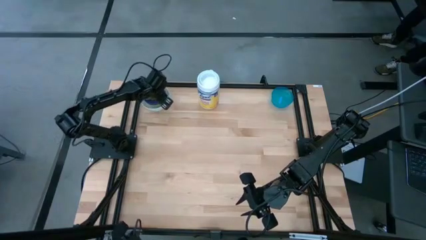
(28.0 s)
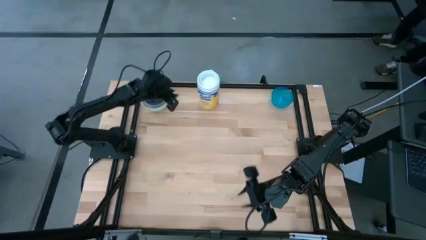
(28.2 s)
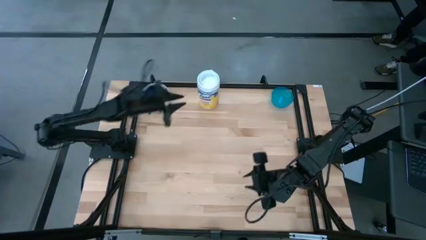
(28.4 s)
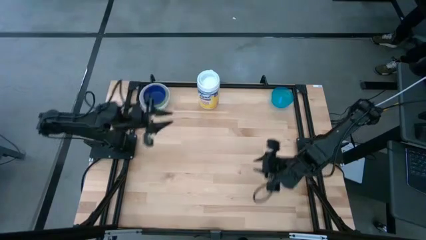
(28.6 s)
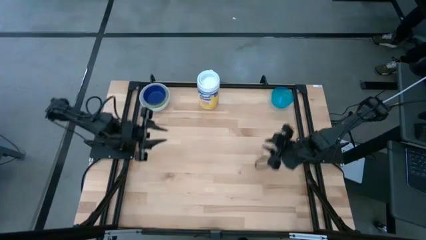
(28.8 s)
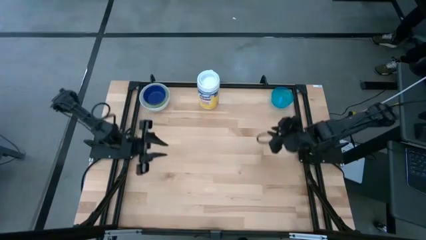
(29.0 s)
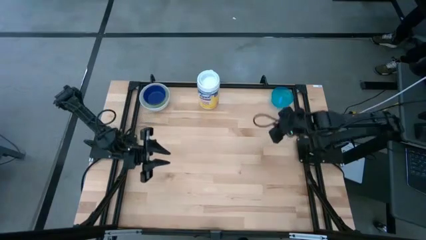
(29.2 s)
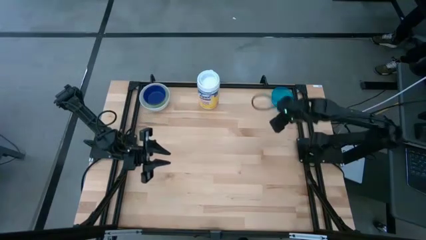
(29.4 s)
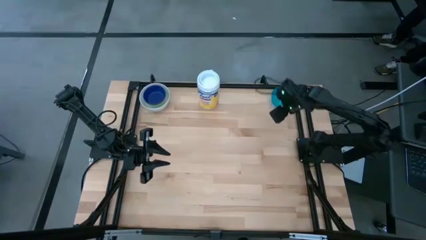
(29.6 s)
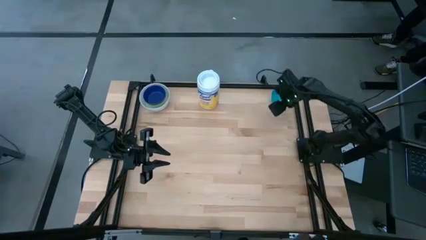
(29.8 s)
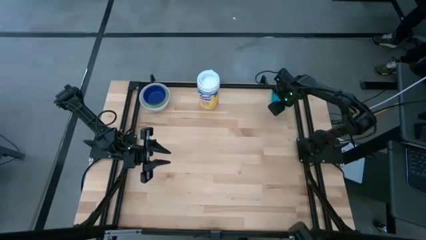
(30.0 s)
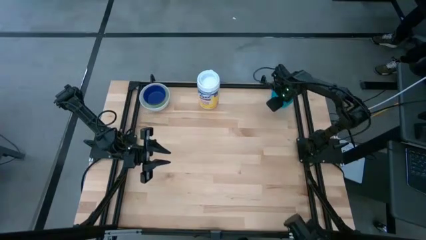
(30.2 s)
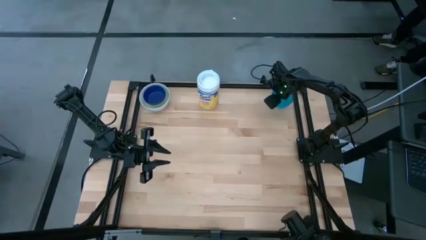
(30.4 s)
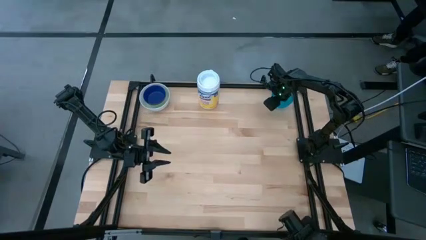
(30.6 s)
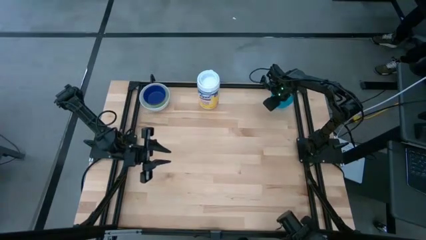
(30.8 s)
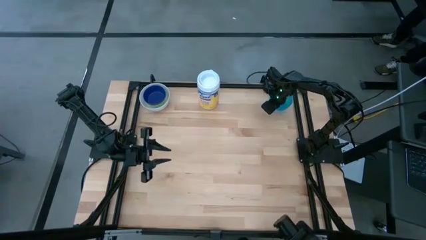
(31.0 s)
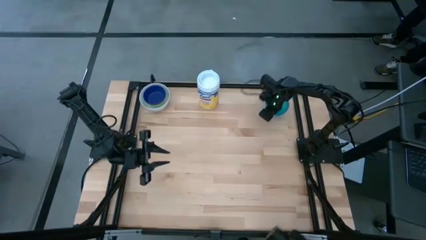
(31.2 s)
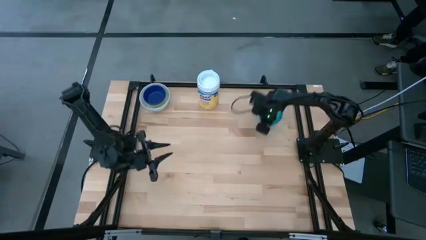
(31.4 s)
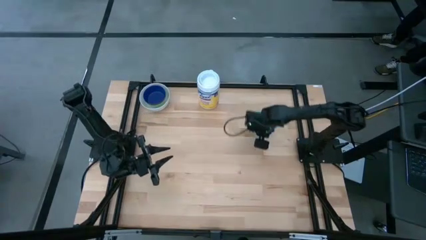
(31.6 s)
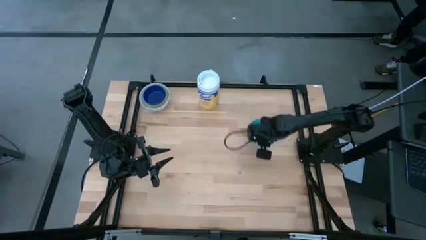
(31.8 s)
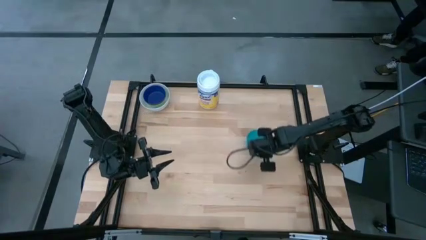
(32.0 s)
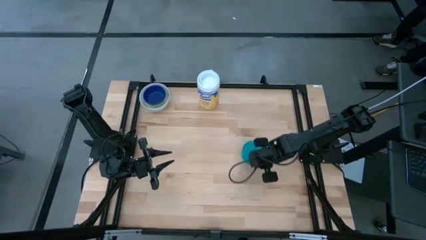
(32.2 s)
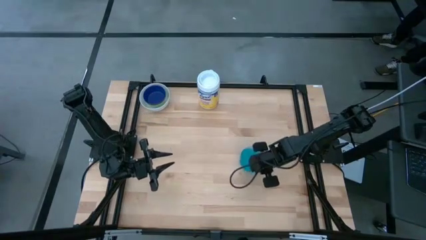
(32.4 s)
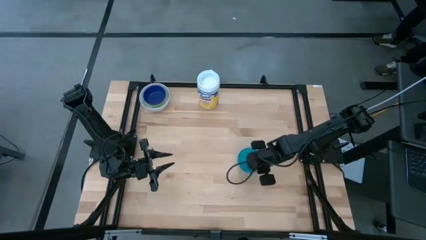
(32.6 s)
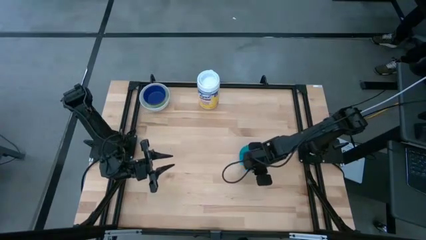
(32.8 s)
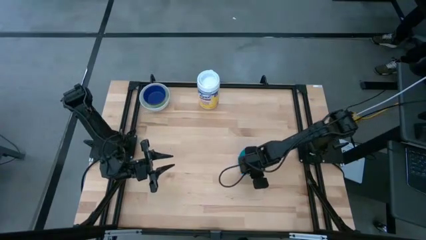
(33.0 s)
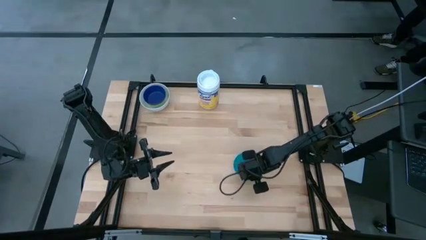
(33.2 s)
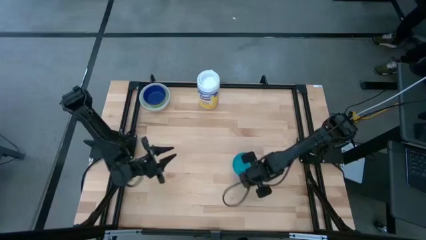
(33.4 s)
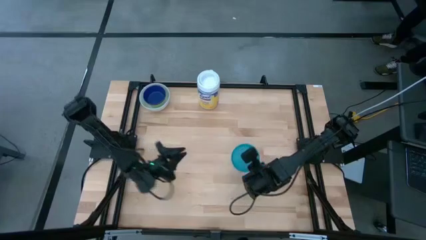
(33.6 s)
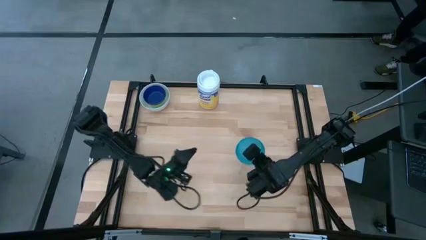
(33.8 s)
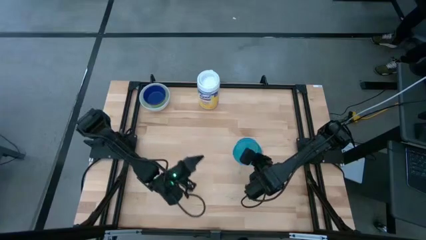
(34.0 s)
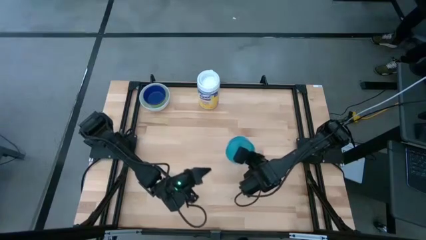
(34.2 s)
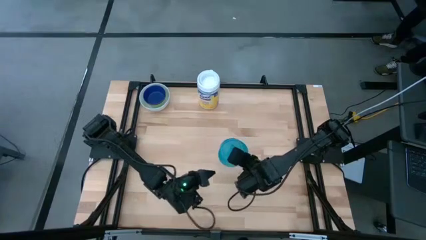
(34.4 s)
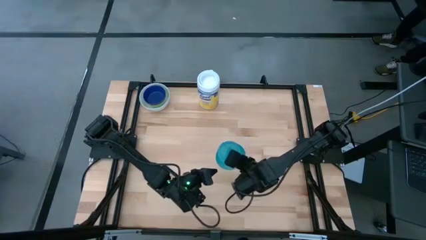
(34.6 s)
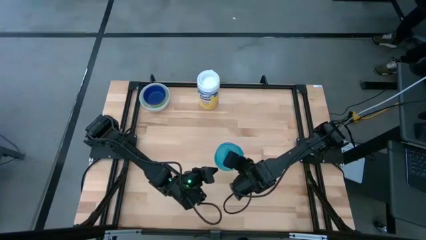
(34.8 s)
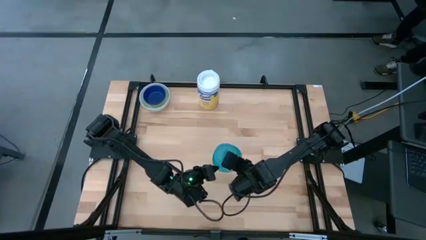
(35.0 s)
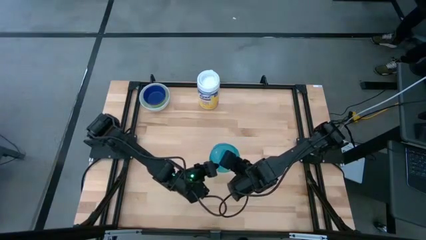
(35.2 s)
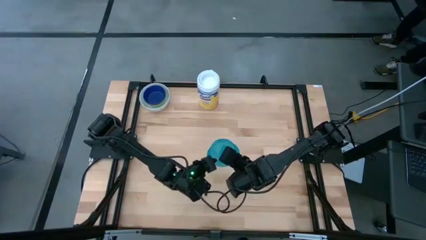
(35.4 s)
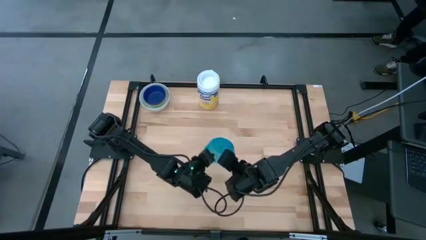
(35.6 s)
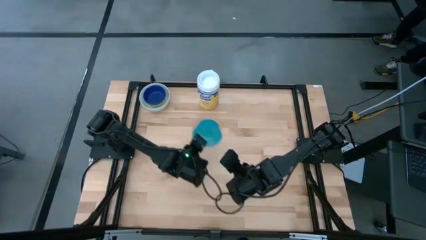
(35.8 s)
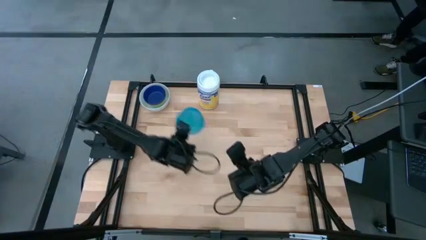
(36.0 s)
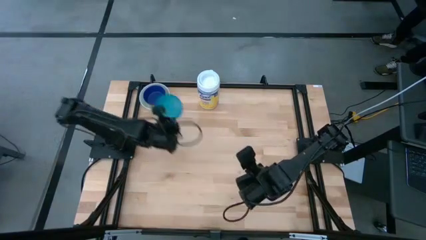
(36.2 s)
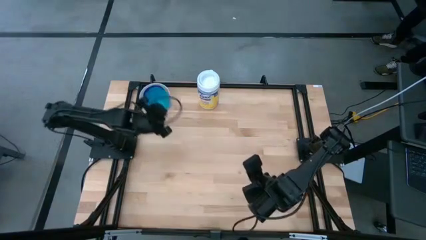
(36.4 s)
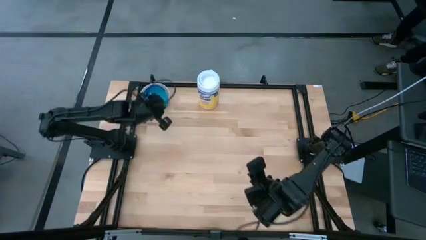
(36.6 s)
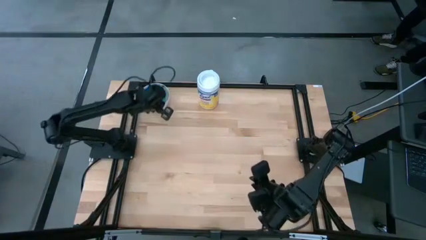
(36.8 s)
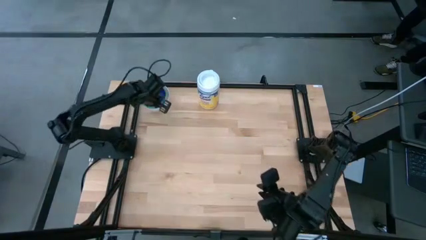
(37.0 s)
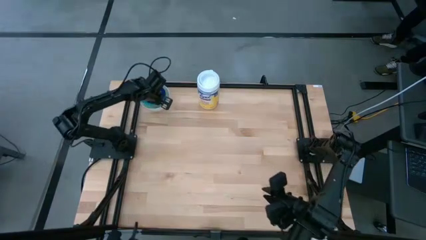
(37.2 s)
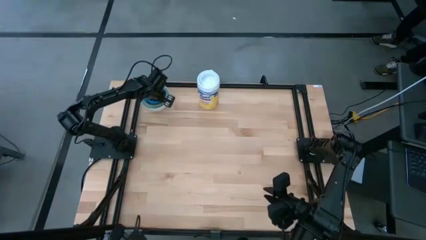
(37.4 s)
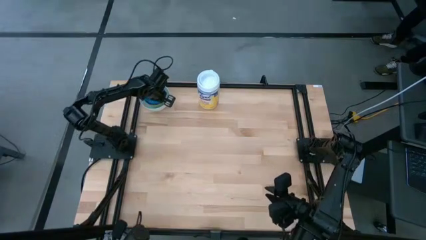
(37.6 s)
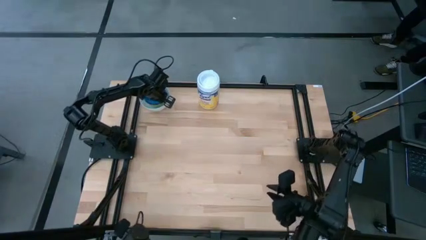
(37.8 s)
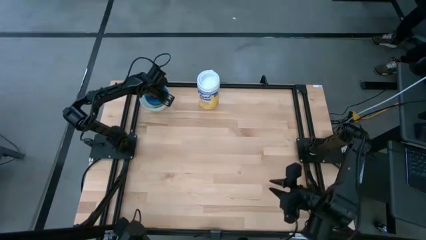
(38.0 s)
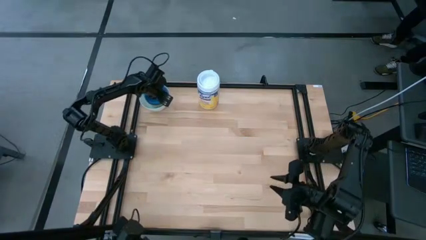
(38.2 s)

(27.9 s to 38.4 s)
Stack the light blue bowl on the dark blue bowl

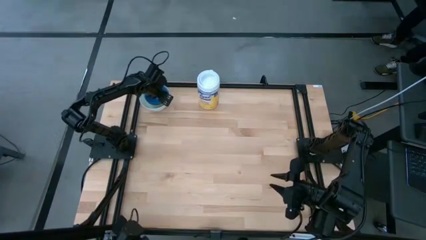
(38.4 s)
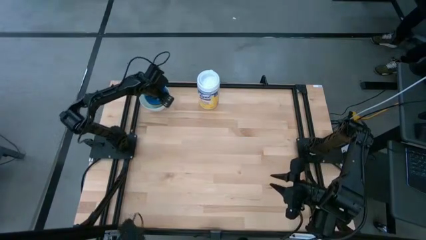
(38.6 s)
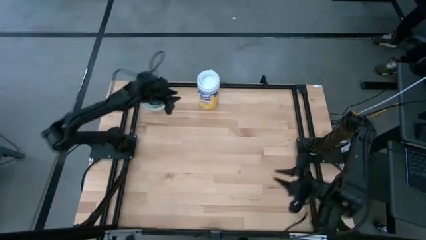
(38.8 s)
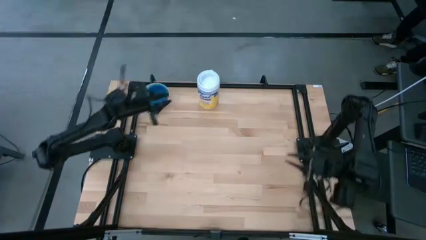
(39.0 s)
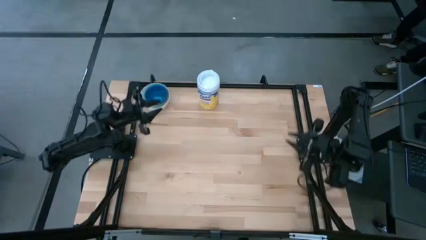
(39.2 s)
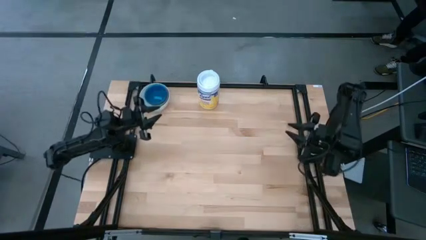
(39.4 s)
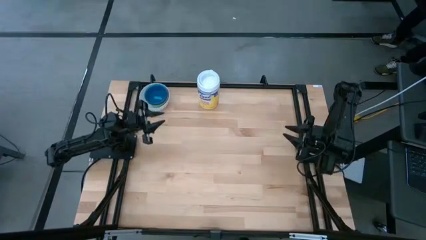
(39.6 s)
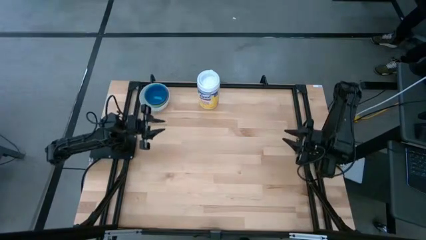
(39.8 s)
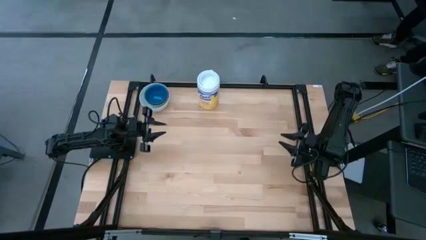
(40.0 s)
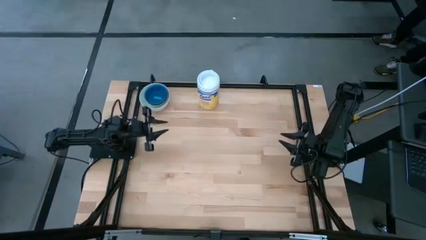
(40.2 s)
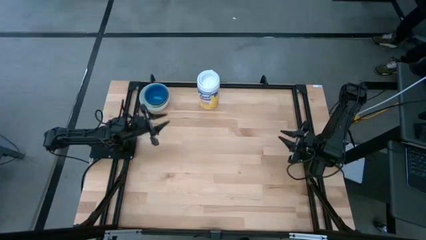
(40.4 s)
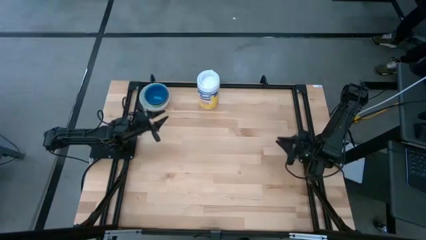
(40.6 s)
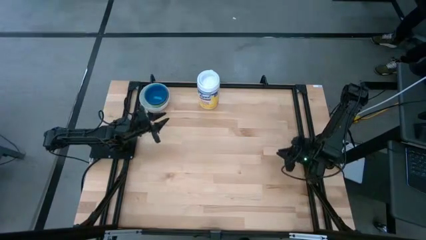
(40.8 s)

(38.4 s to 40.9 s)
Return to Home Position

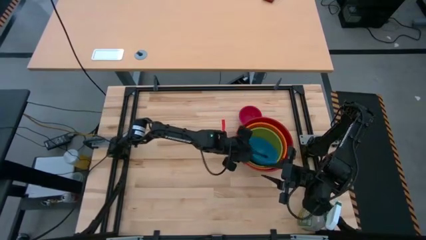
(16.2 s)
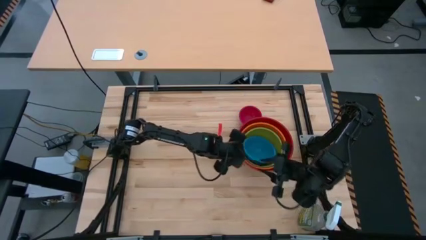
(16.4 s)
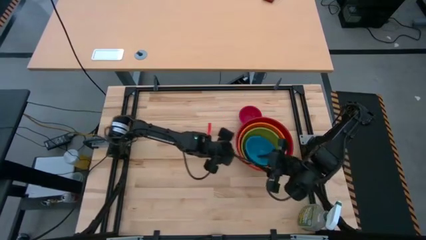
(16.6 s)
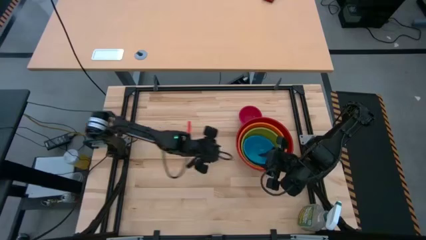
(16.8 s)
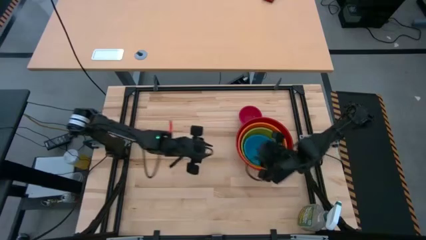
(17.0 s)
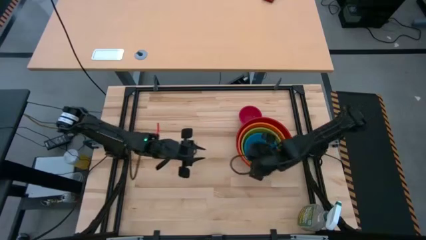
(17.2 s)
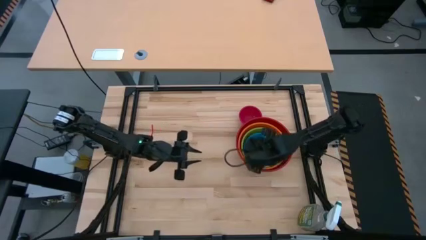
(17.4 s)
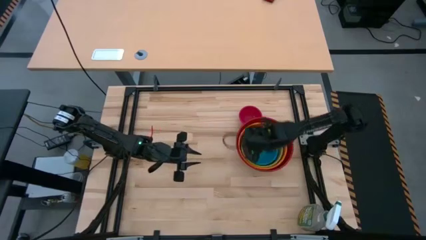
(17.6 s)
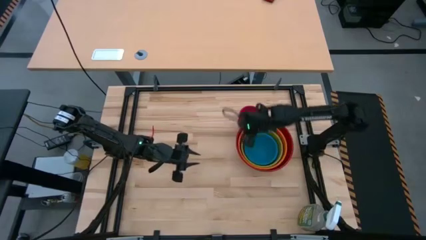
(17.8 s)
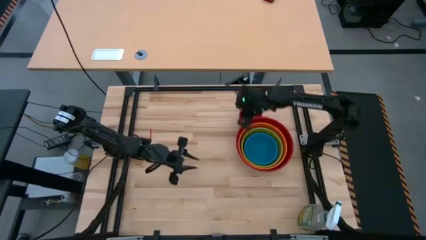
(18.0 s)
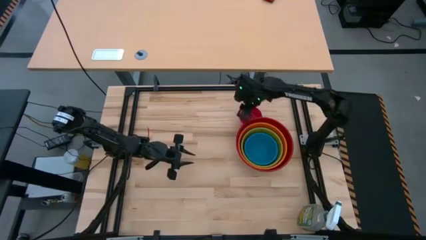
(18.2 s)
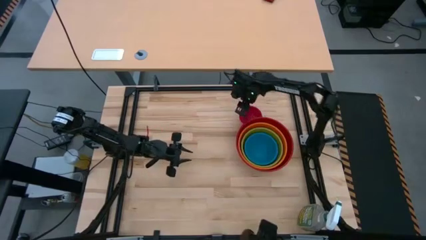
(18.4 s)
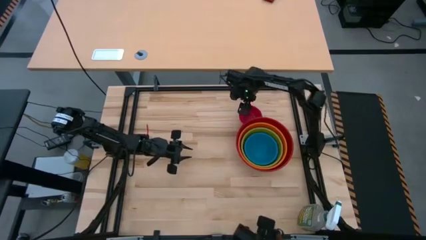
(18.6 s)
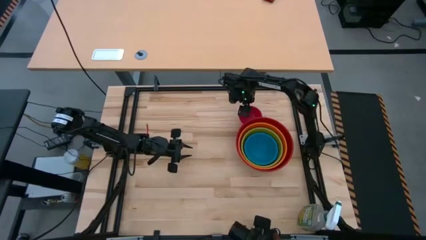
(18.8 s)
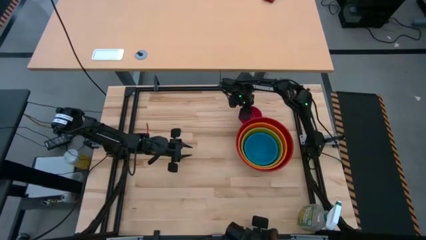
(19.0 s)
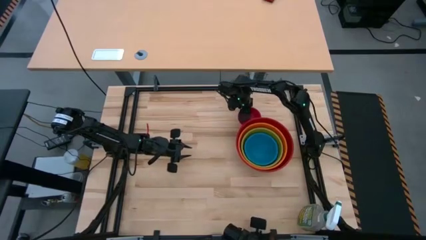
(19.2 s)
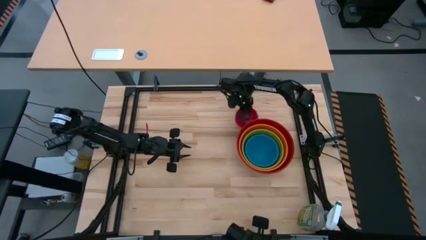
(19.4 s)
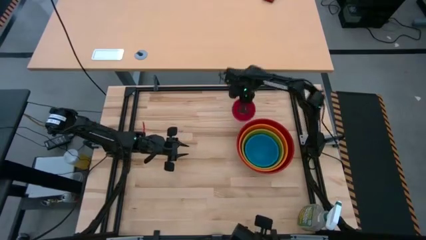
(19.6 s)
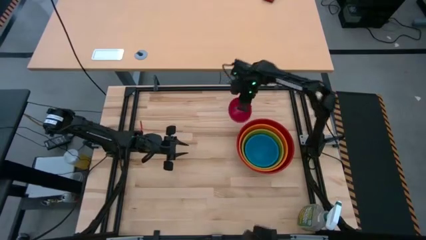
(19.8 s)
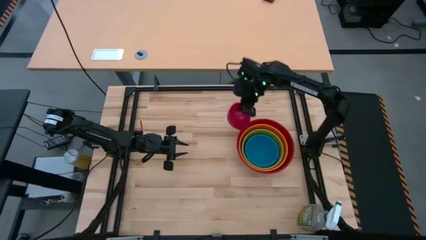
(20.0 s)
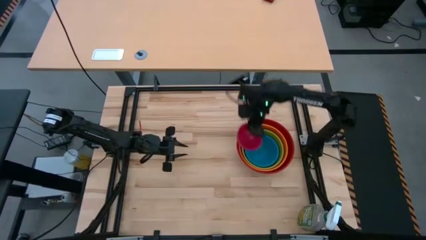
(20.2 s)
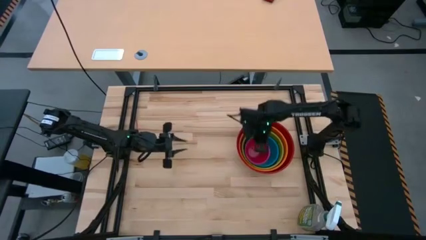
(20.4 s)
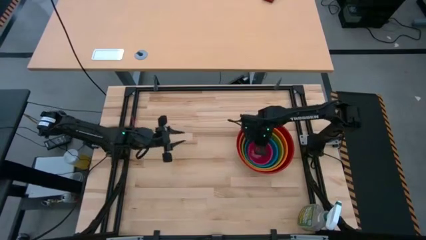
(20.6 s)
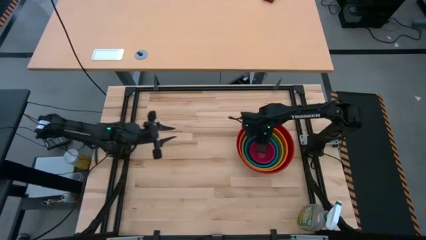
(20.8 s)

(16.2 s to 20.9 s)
Stack the pink bowl into the blue bowl
